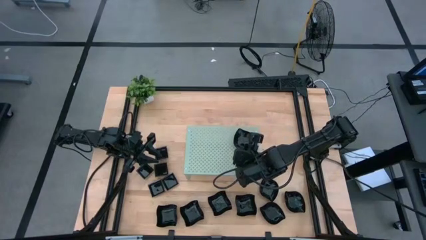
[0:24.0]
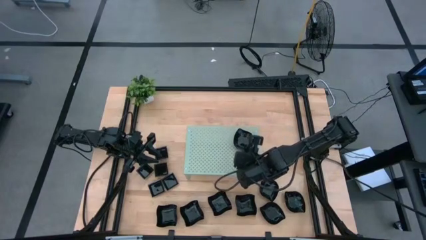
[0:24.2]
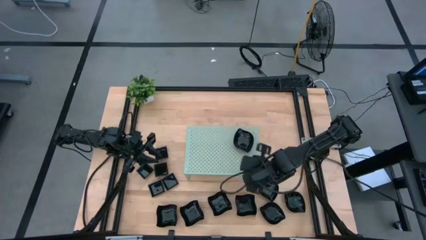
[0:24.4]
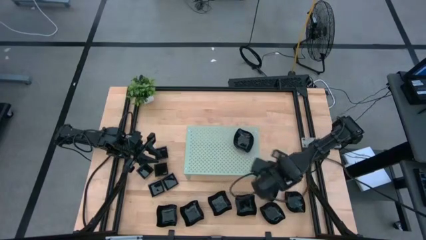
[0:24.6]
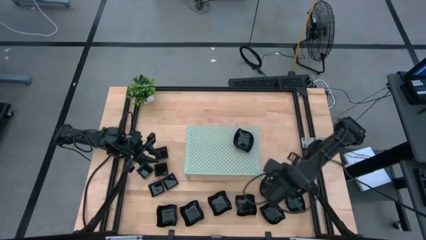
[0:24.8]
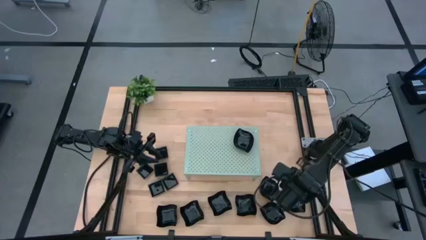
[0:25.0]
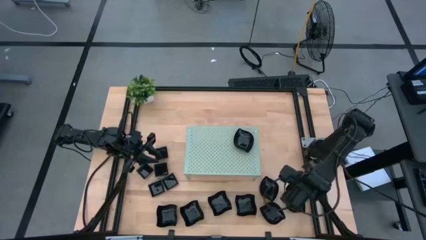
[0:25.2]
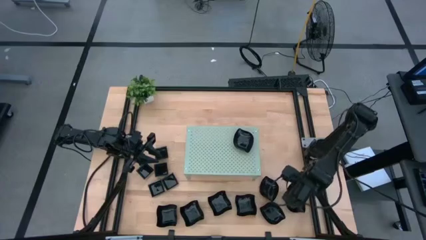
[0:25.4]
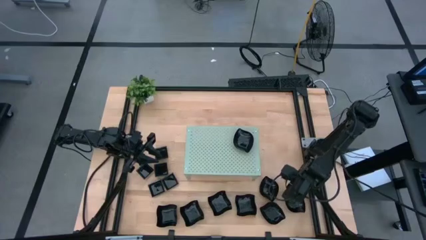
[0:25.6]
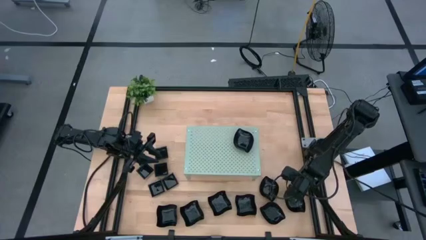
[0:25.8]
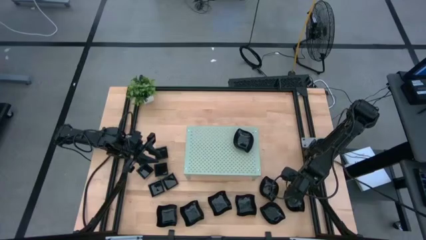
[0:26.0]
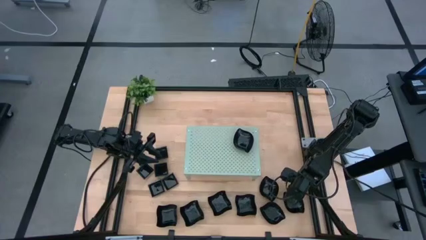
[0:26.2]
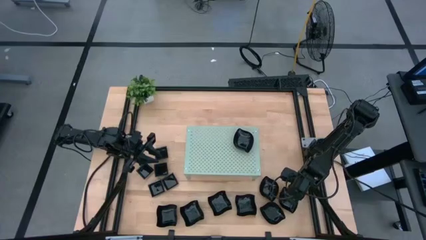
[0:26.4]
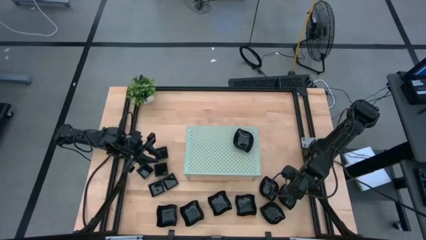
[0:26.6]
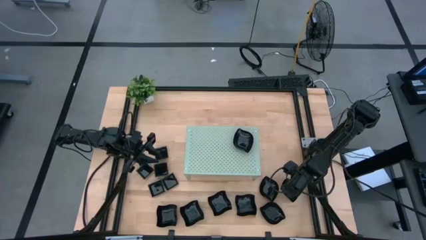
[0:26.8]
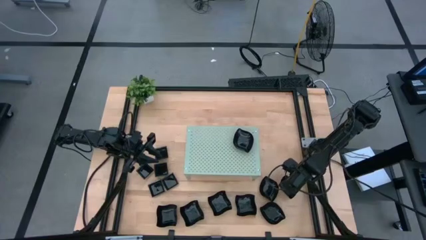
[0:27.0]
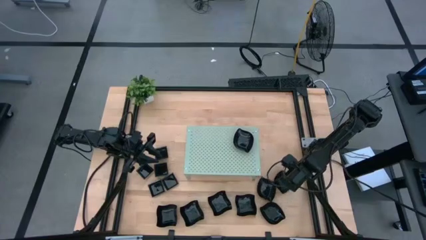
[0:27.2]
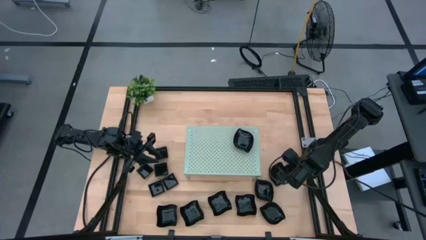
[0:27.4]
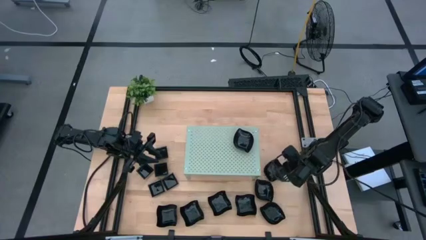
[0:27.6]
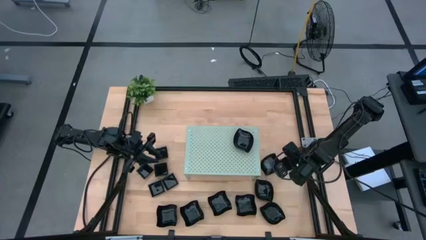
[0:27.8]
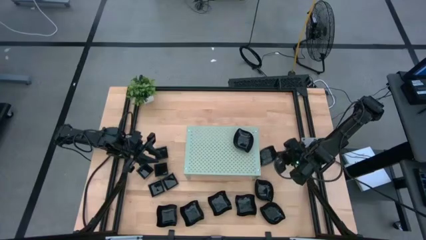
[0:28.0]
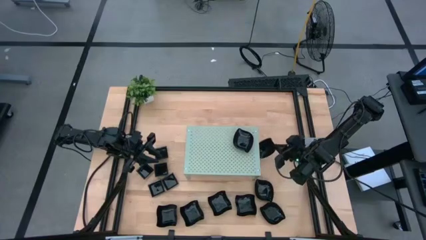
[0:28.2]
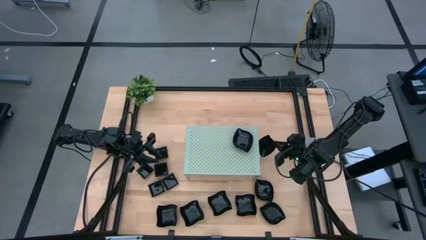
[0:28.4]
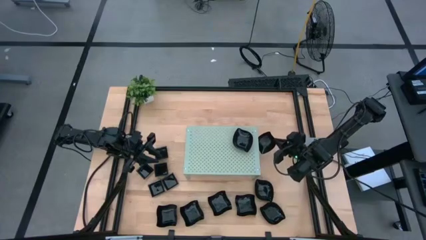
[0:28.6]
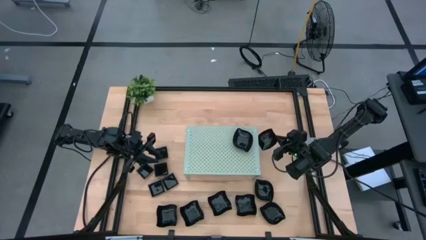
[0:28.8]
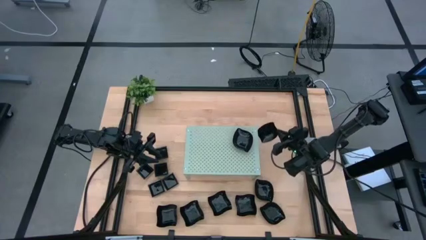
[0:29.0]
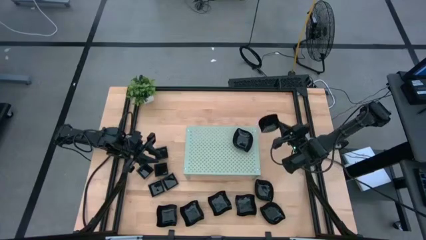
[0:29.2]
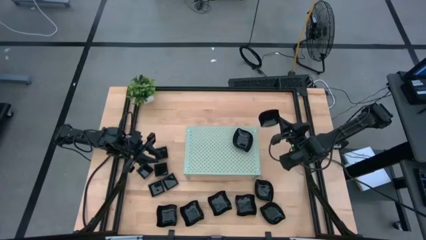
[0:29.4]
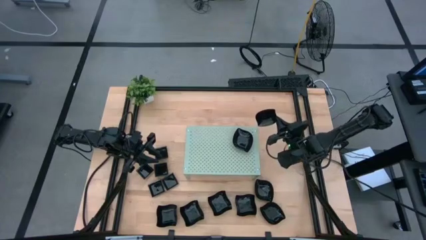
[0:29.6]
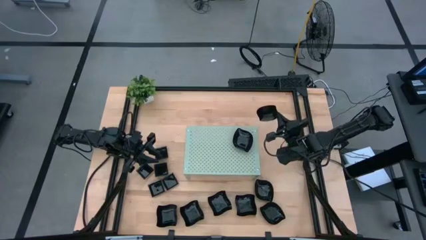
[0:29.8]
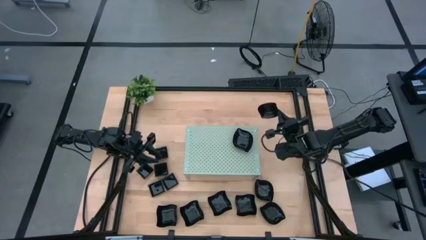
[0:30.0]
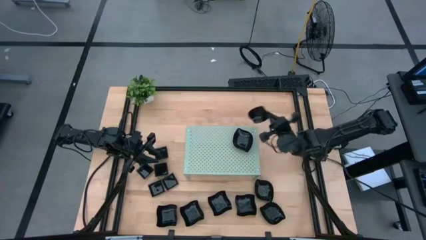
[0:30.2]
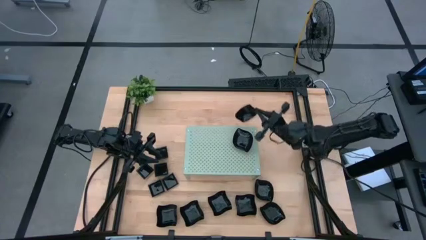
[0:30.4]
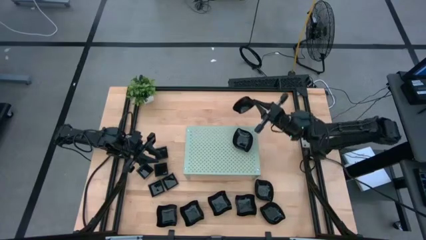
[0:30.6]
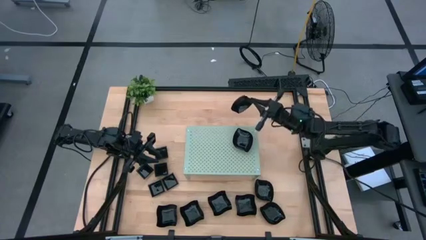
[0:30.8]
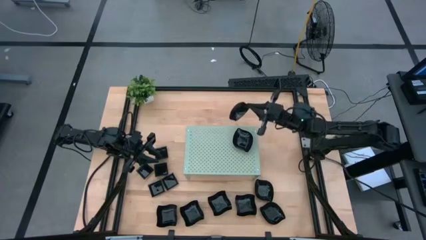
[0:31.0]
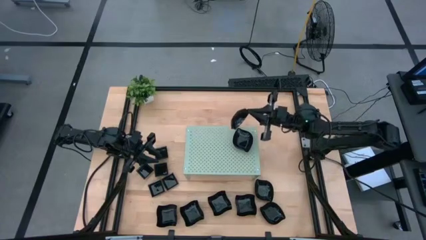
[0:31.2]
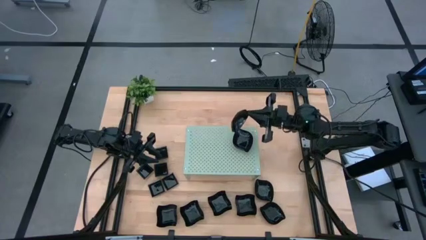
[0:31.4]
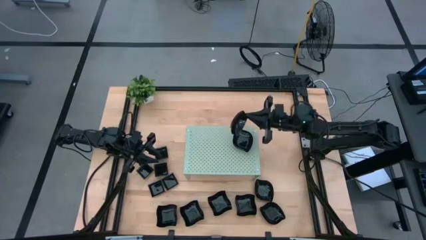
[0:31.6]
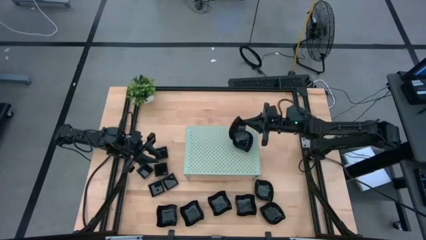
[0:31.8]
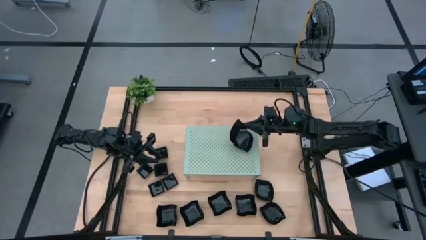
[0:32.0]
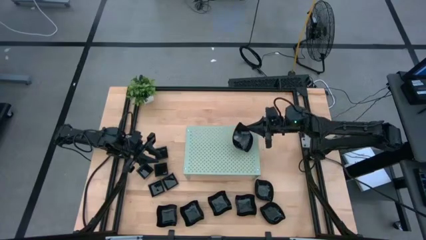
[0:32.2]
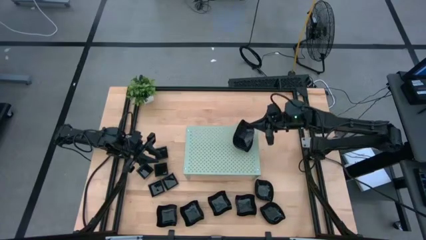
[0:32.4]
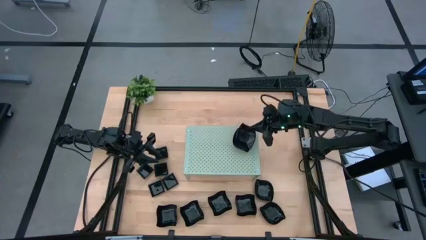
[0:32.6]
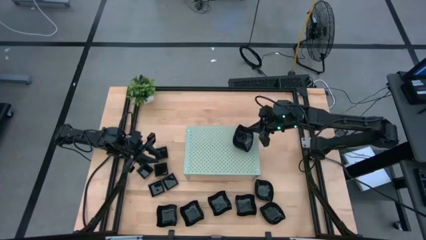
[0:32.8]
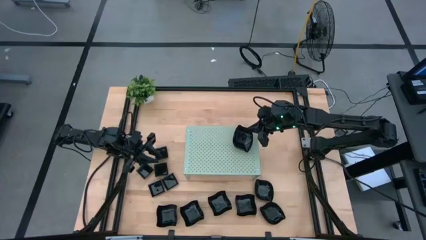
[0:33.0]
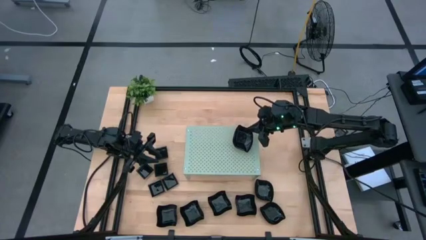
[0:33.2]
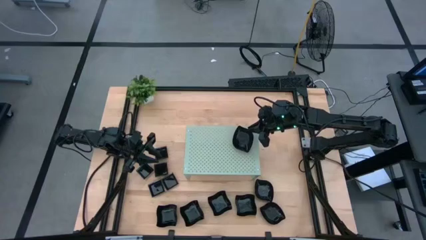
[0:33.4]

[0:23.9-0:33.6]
Task: Pick & Place Mini shaped plates
Stack the leaf-shaped plate on top of the leaf-shaped plate on the shelf

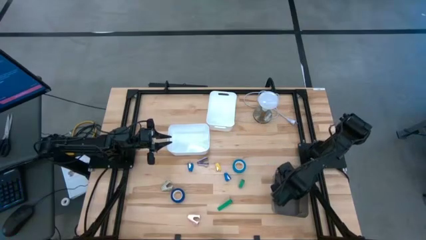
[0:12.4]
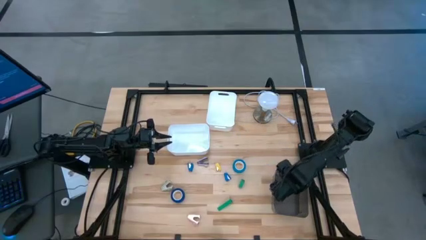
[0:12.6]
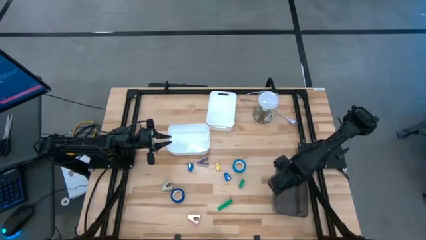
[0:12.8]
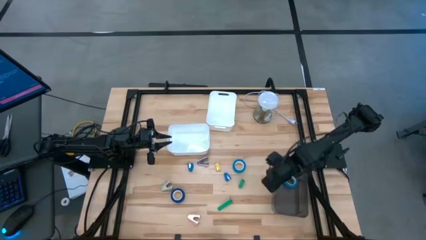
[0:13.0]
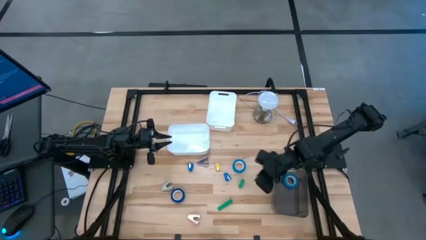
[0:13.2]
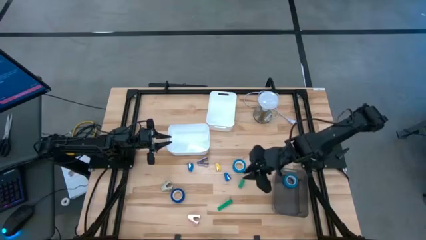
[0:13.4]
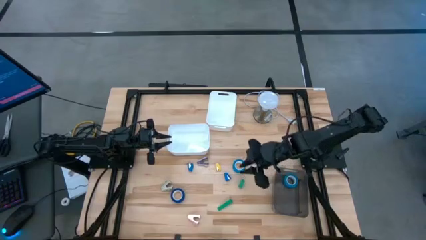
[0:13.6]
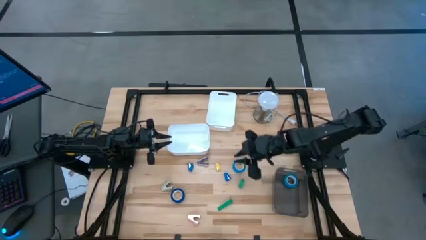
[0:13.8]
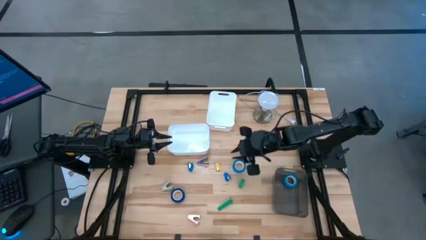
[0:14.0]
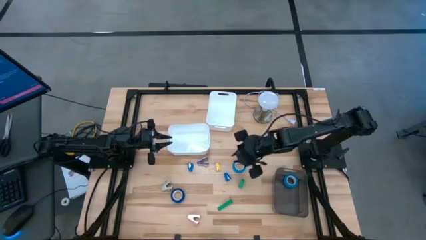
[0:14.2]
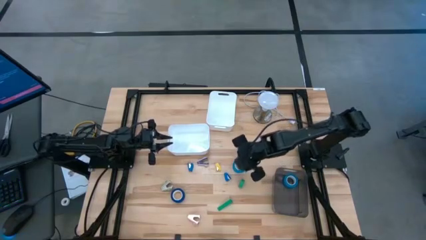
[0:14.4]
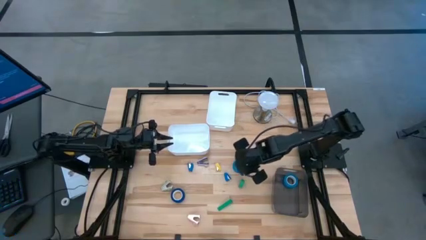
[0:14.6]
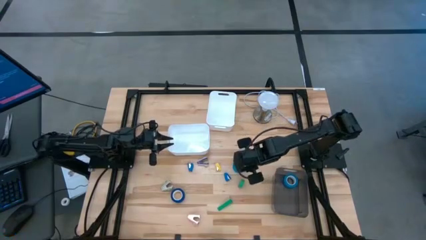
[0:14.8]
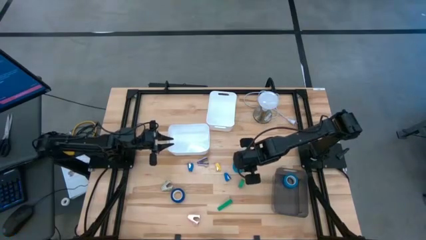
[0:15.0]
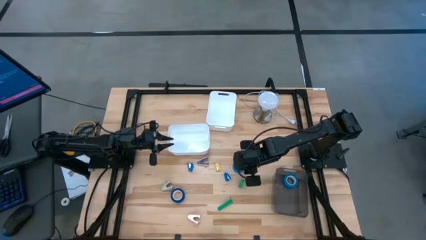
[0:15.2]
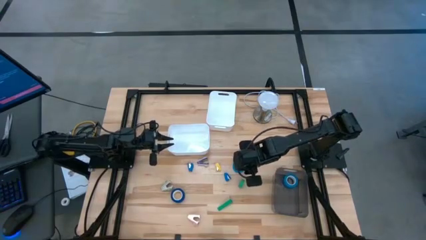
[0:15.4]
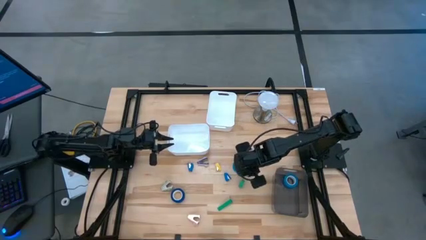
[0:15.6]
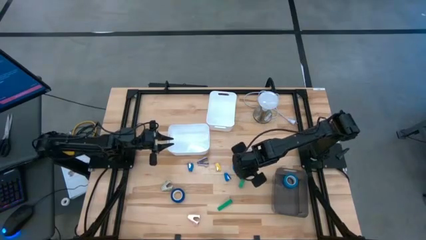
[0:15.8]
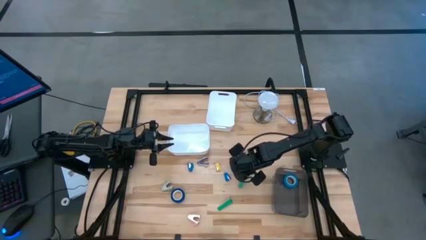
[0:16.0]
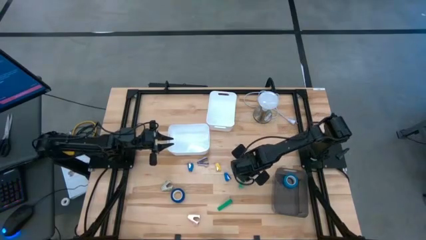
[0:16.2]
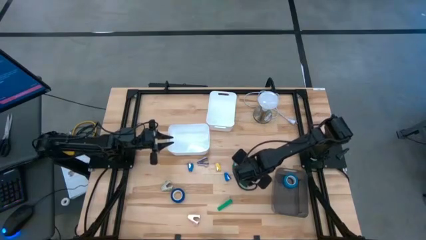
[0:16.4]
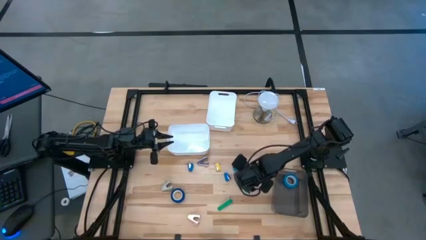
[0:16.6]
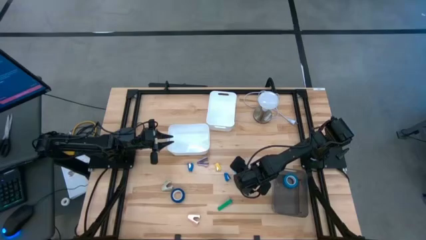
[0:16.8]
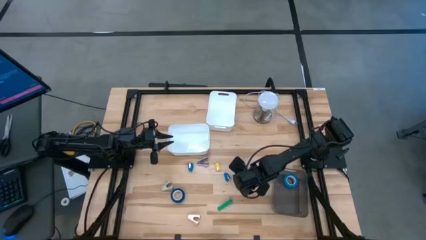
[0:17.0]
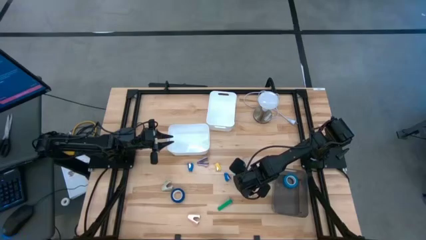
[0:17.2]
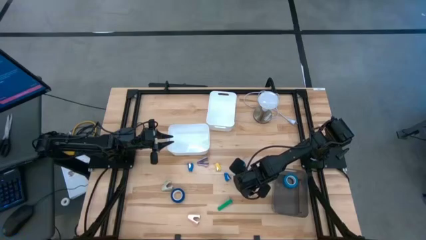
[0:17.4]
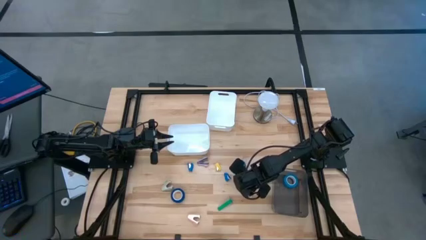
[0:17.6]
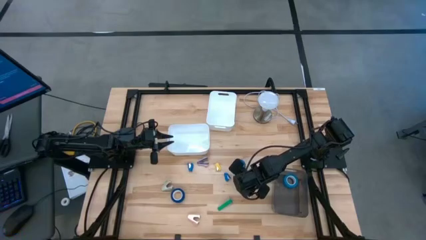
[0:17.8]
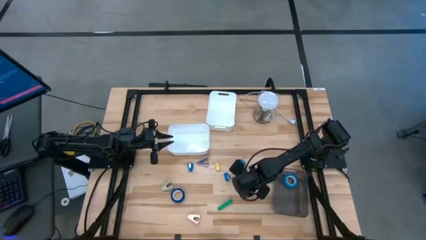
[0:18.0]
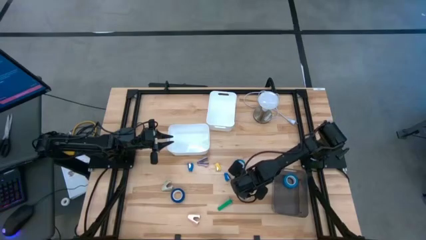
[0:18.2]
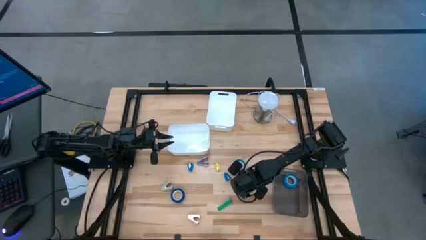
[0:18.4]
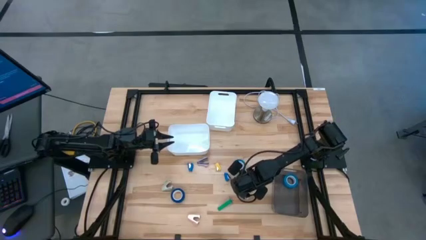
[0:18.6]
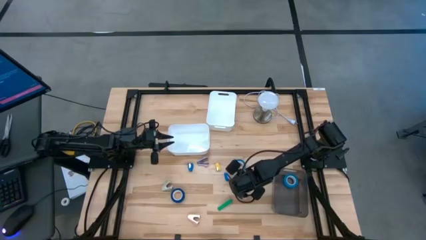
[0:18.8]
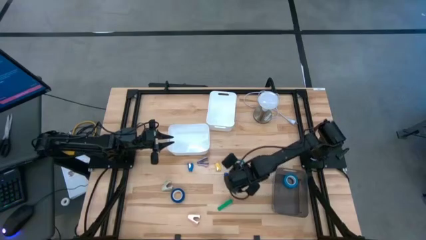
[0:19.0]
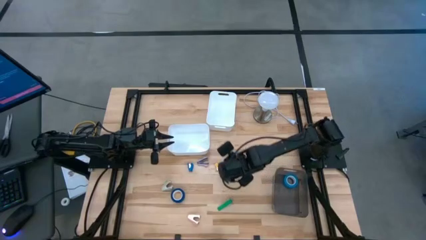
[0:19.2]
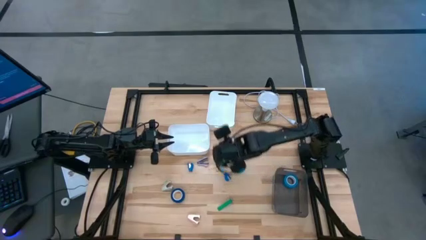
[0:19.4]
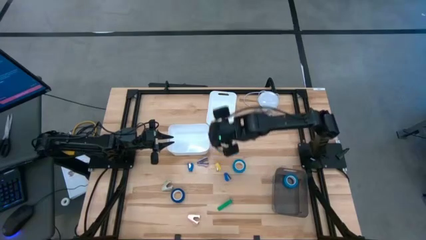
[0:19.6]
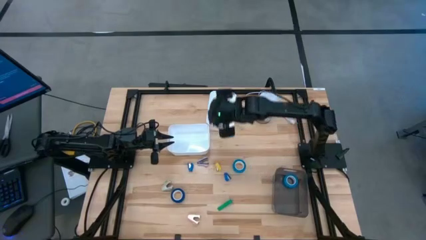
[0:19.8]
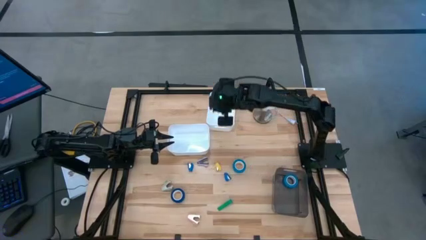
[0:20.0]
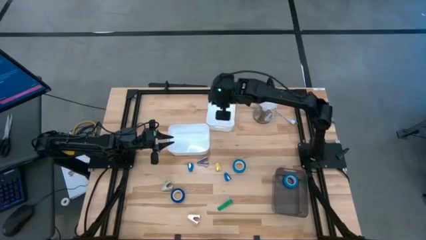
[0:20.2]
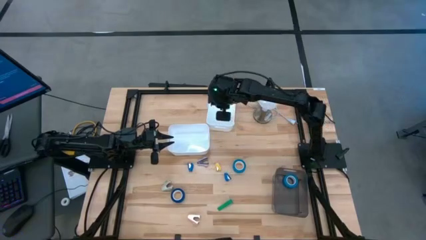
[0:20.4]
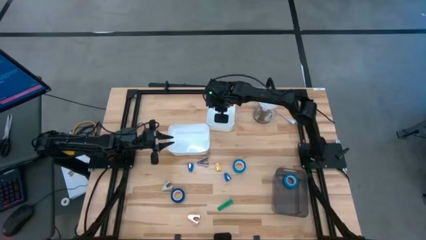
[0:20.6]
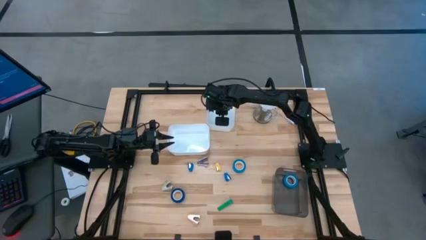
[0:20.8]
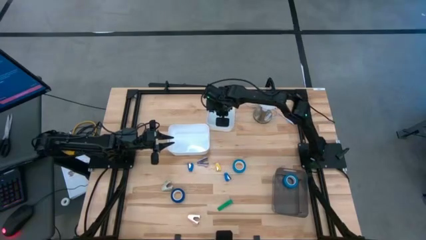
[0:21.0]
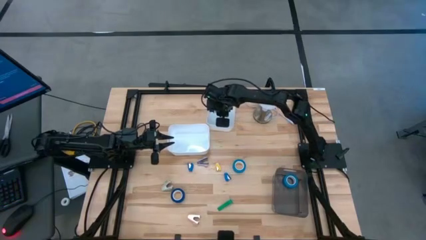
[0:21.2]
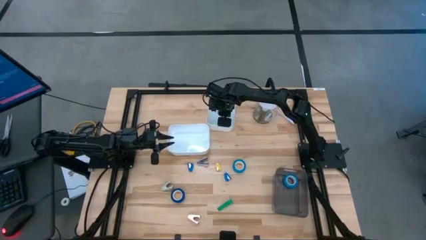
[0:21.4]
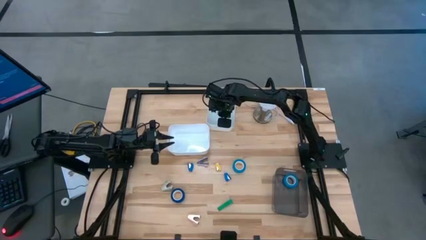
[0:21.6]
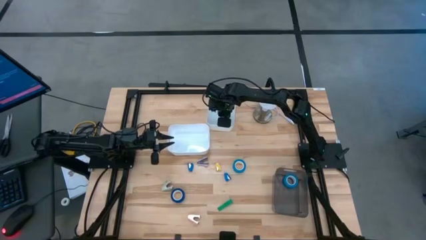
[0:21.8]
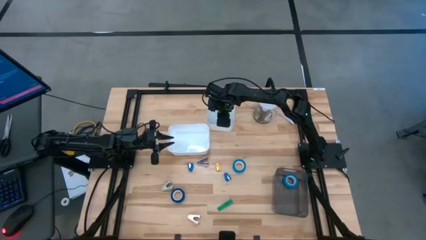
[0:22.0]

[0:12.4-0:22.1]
Task: Pick and place Stapler, Stapler remover, tape
Put the top green stapler into the top white bin
